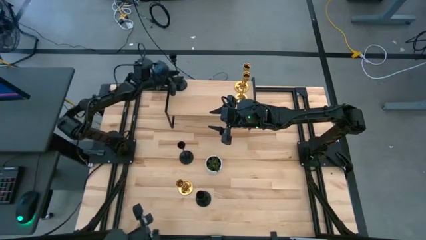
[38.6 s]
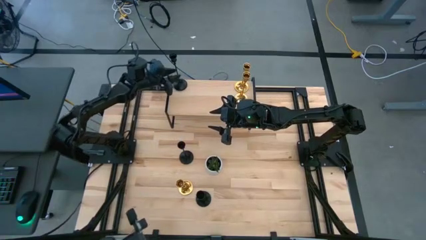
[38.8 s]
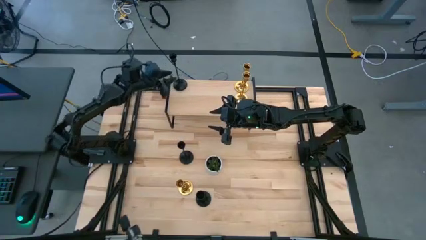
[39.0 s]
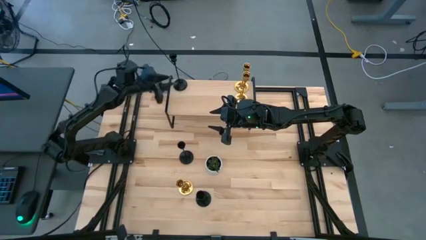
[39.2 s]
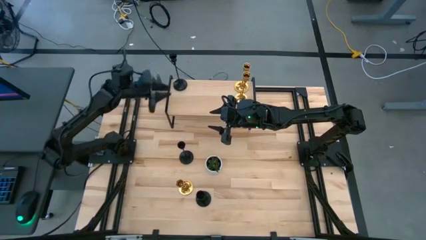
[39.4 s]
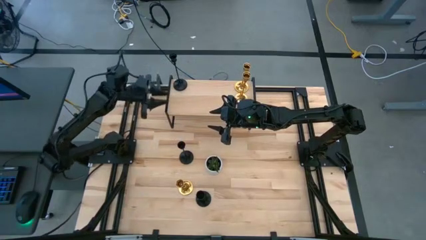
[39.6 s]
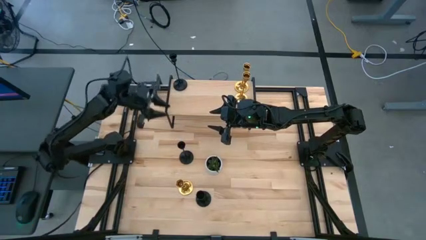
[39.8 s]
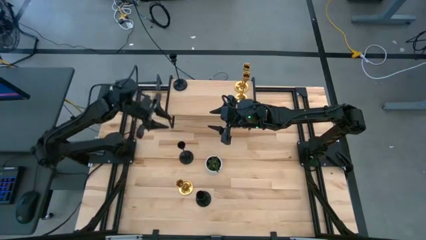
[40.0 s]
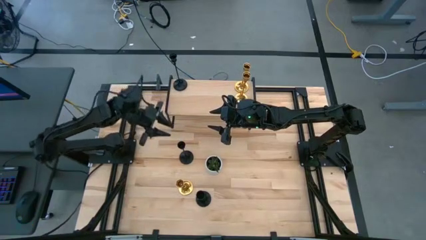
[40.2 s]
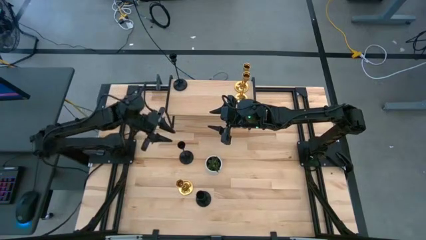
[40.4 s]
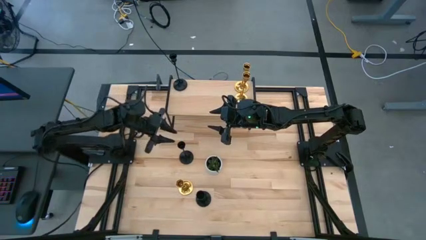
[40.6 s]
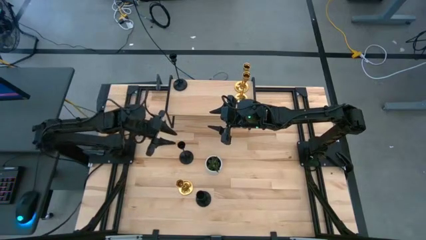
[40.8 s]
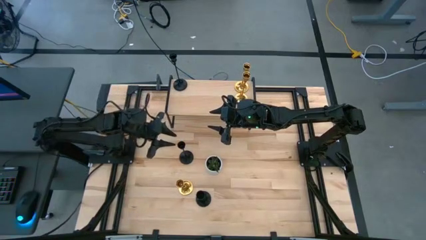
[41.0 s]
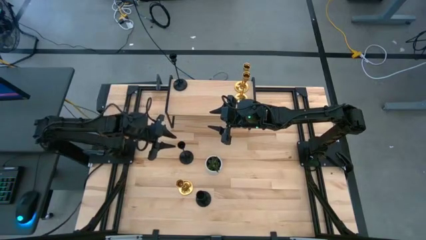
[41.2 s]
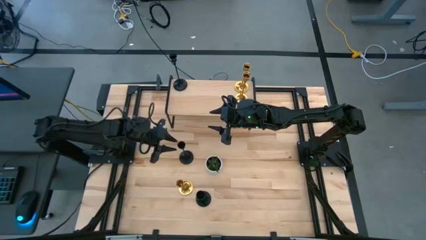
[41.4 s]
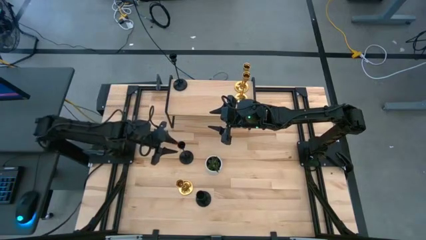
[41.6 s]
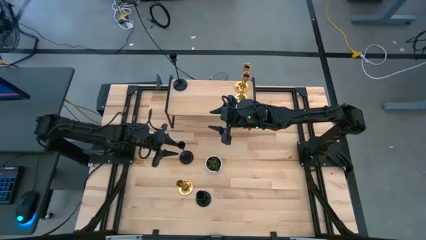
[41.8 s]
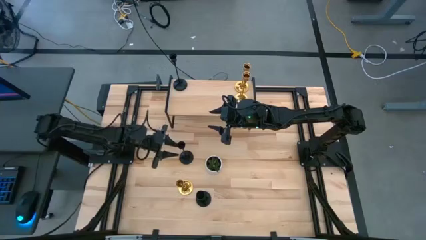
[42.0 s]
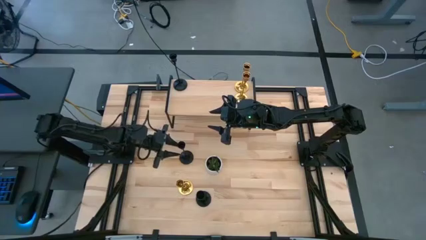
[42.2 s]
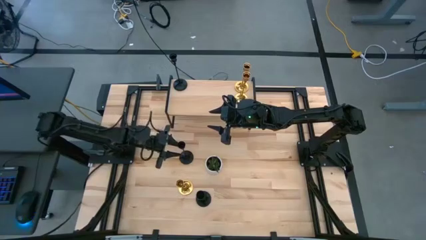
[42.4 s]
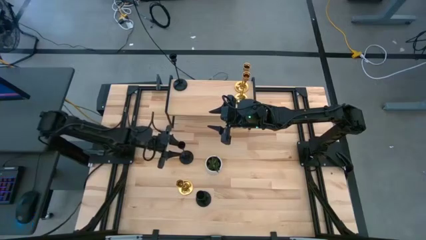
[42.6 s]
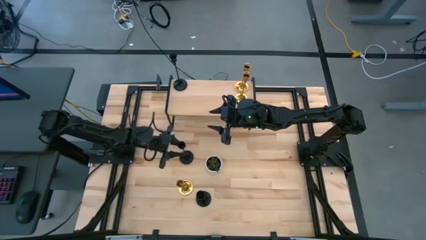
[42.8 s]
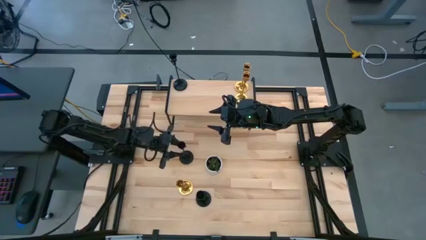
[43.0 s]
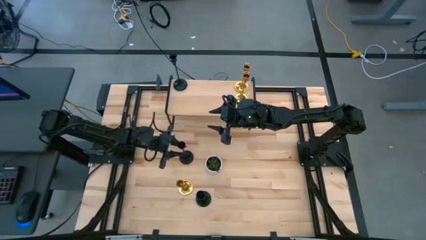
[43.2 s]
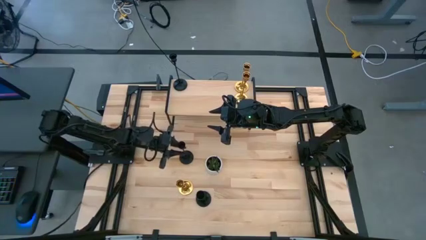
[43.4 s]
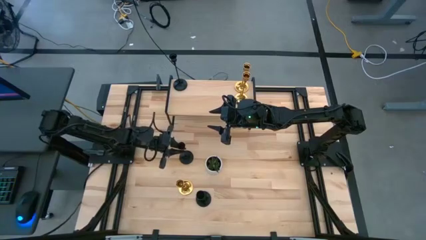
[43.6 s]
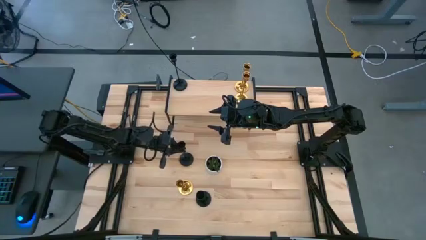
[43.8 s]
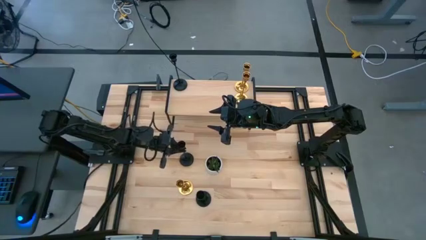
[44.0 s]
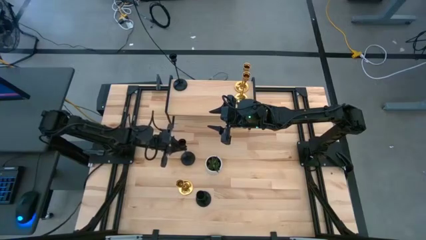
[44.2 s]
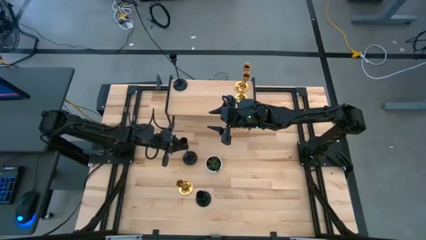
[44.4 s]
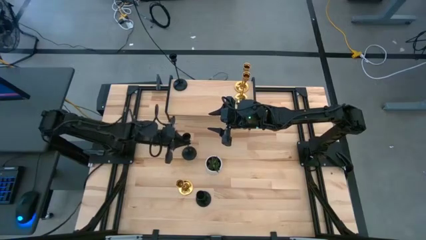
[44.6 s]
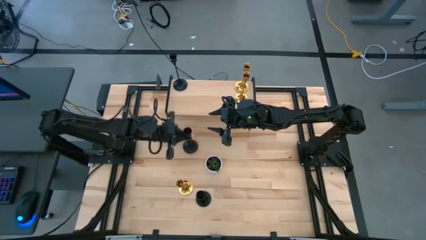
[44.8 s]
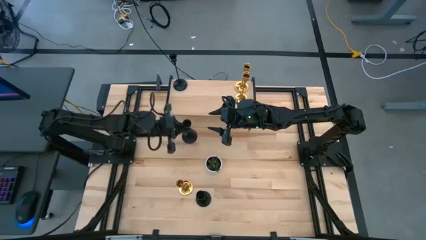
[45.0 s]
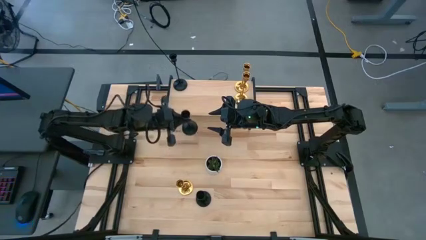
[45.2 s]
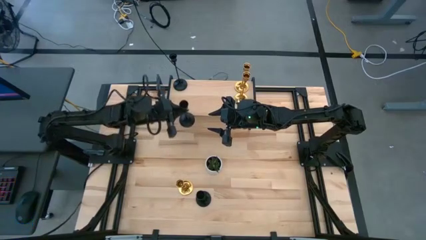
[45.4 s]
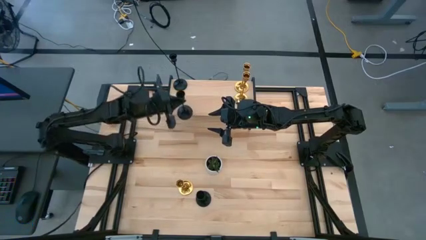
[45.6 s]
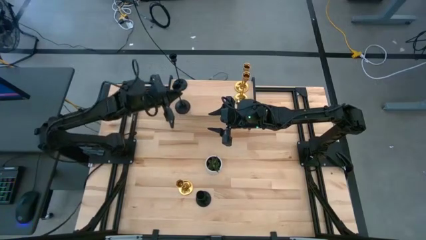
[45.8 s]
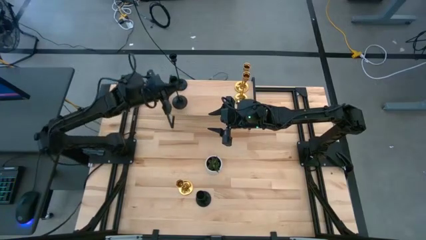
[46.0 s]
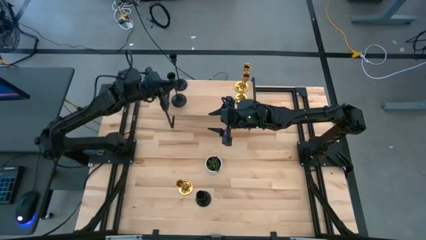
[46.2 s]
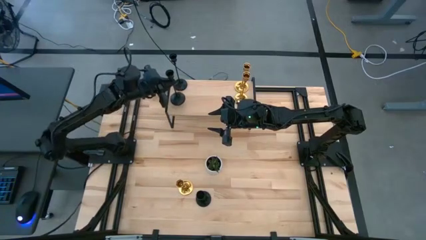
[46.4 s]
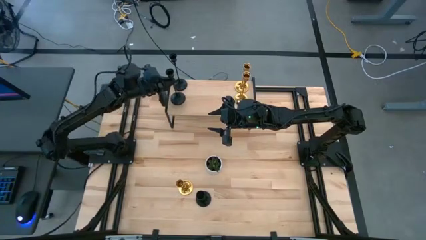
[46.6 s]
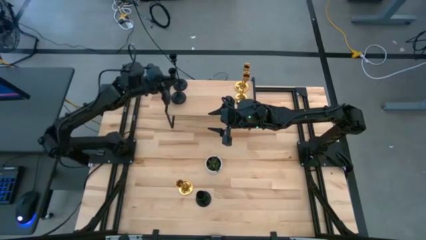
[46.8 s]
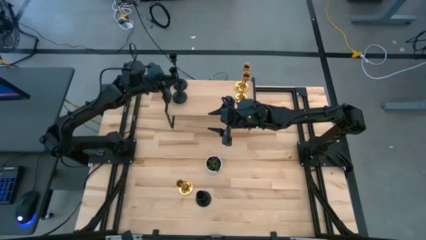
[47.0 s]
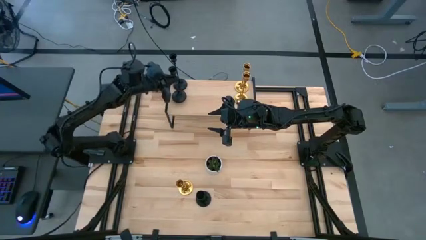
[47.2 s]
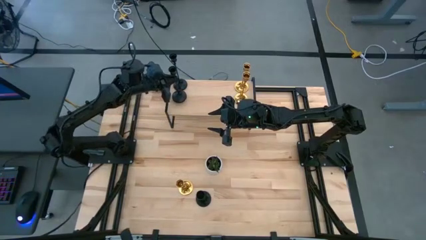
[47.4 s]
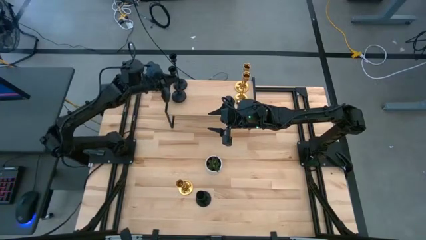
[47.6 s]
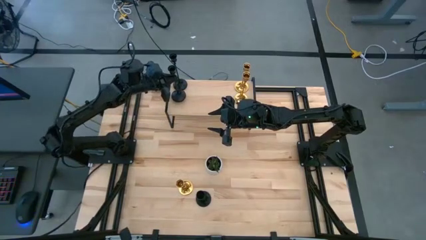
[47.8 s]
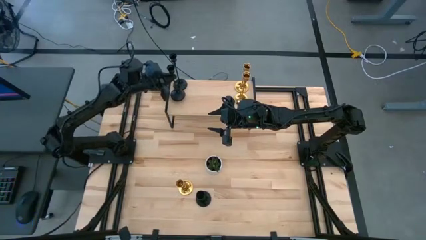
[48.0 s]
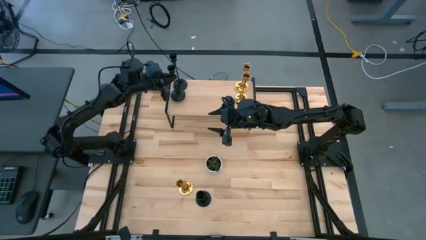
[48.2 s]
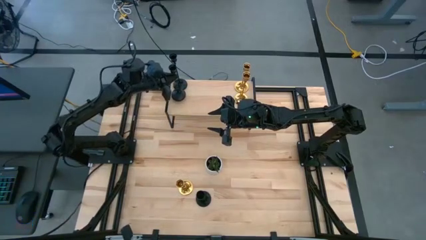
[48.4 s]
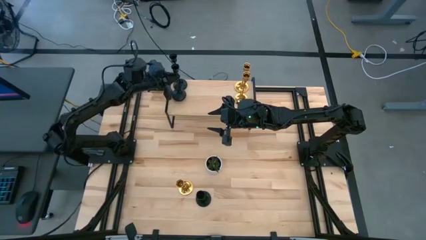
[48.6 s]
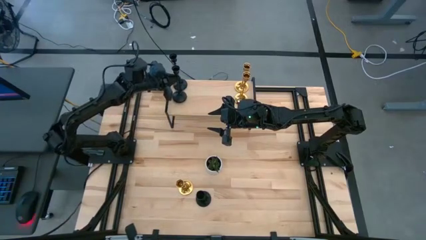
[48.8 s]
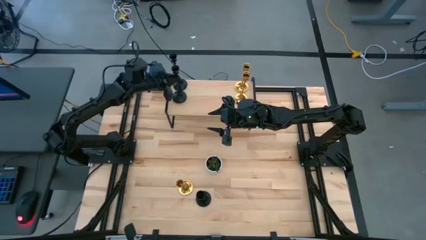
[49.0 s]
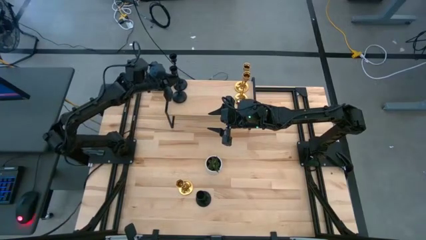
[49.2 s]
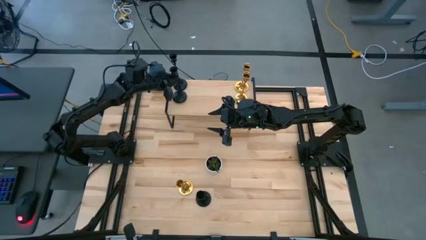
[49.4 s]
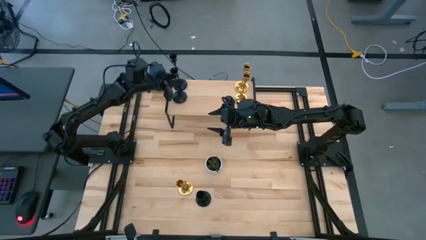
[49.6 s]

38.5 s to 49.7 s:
Task: Pick & Place candle stick holders
Put the top black candle holder on the shelf aligned with the other black candle holder
